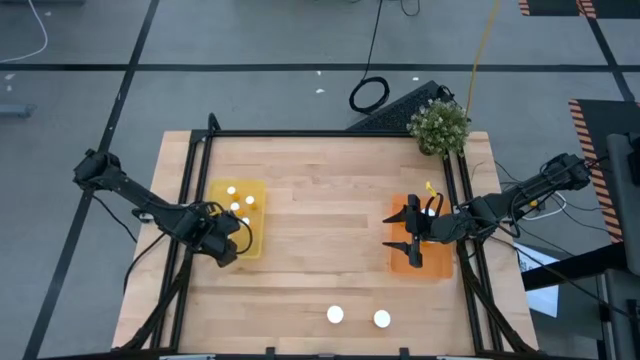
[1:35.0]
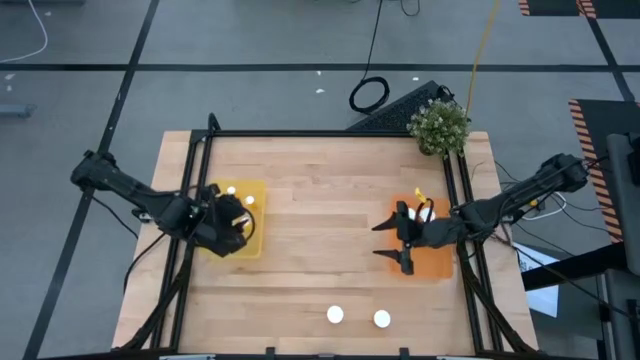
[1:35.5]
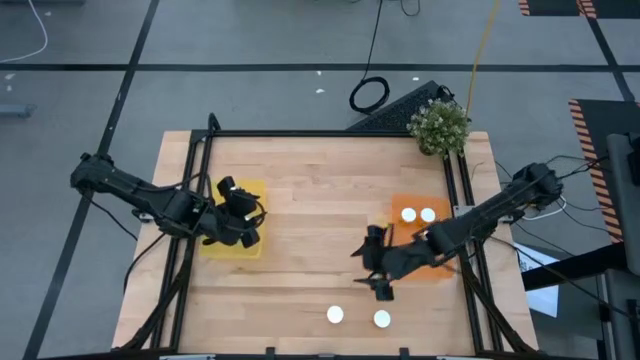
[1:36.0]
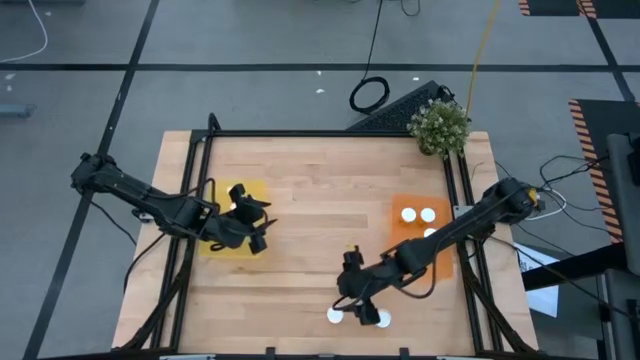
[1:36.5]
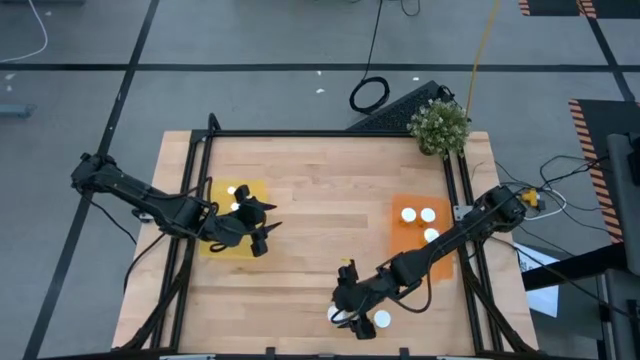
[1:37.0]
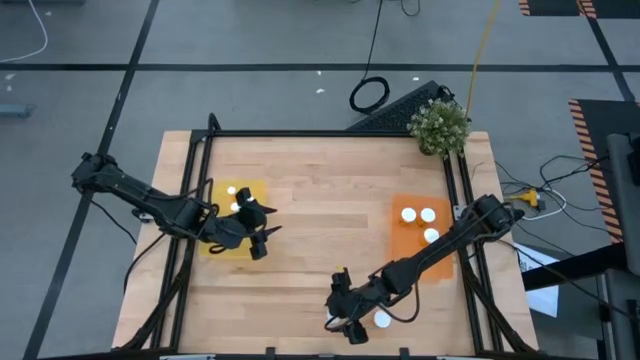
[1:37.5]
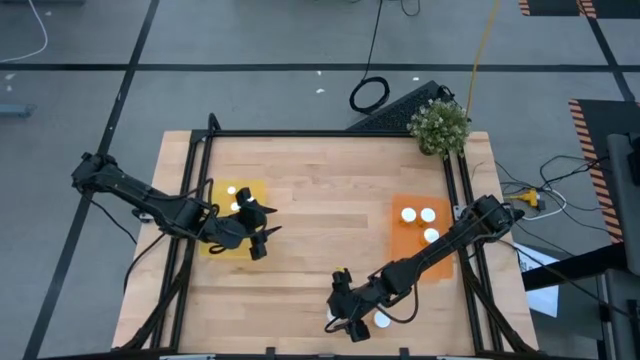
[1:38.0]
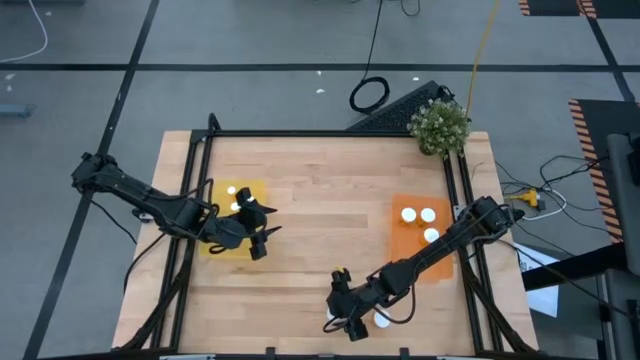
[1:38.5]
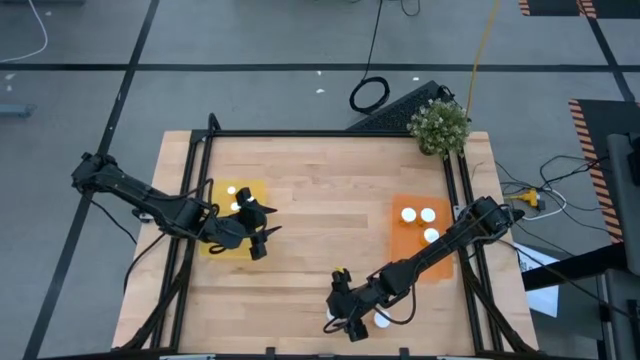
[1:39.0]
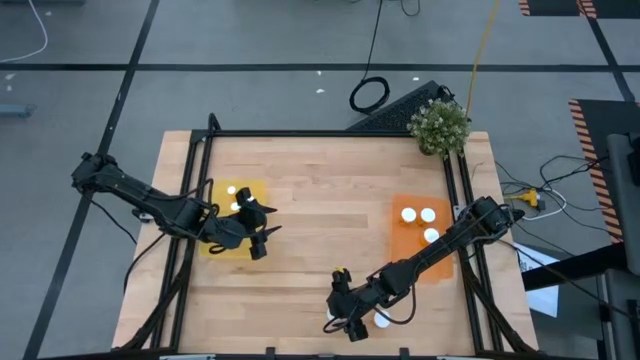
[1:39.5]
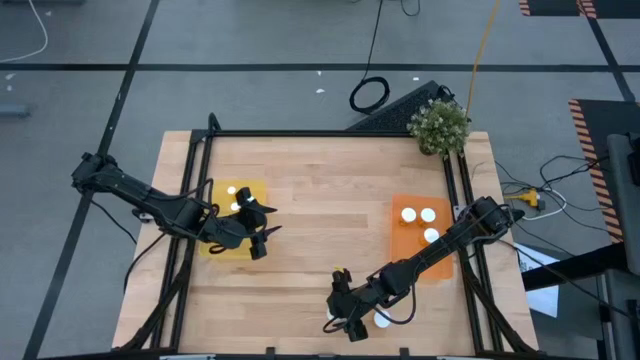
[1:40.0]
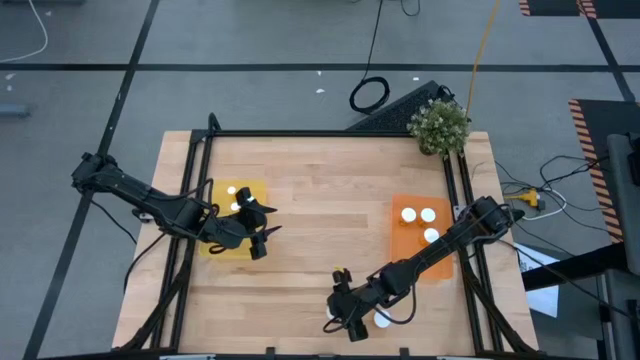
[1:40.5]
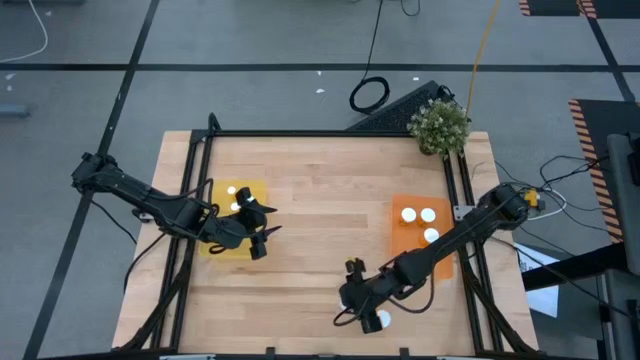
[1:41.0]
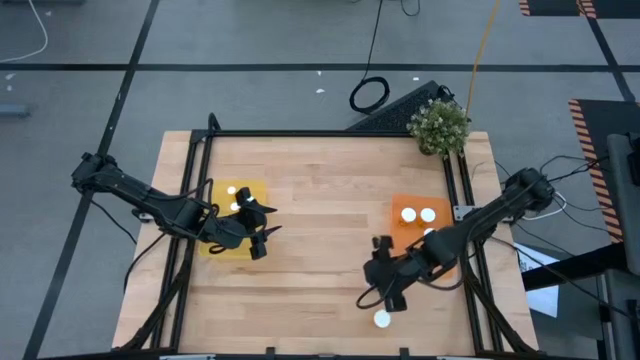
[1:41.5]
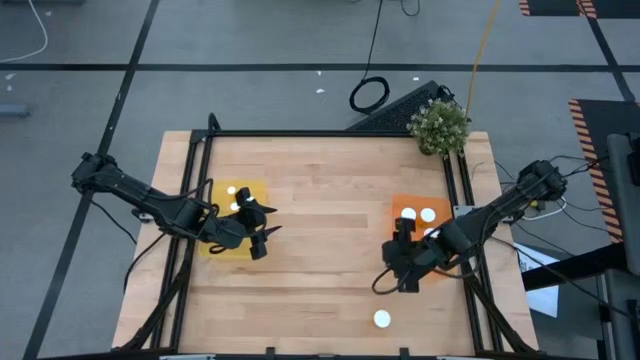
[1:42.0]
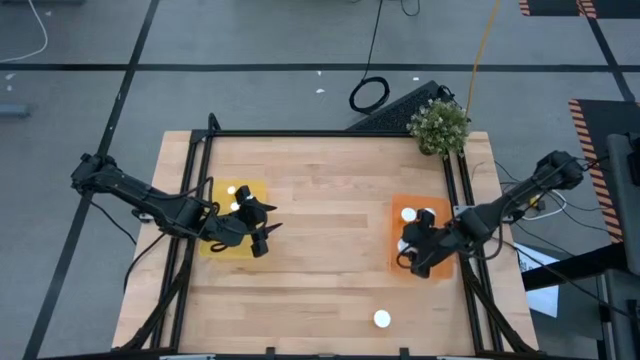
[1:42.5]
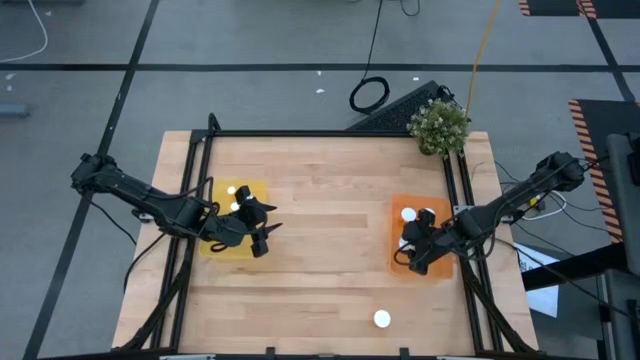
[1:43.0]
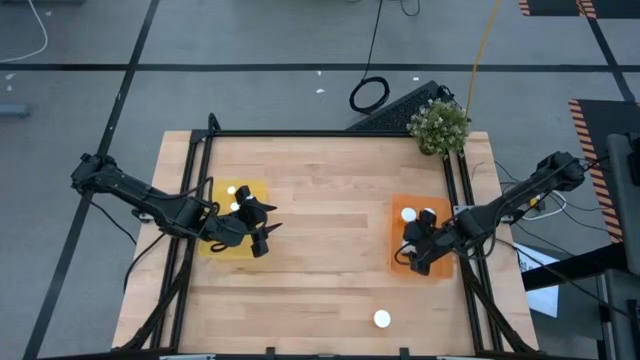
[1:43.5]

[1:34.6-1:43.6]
Task: Pick and place medicine bottles into bin by pill shape (circle, oval)
Put the large orange pill bottle into the orange bin

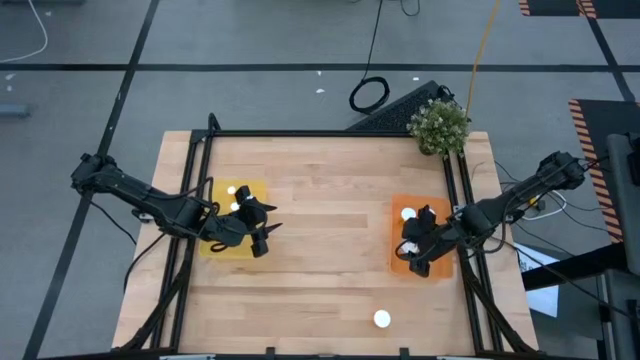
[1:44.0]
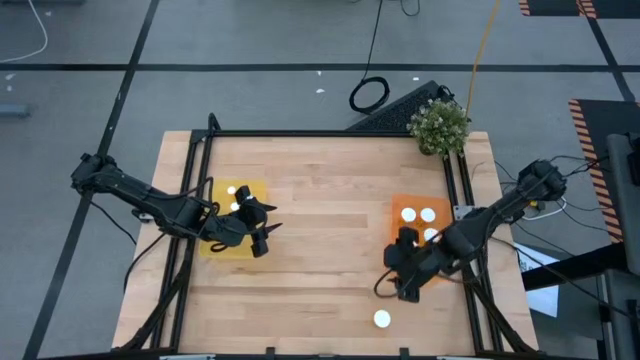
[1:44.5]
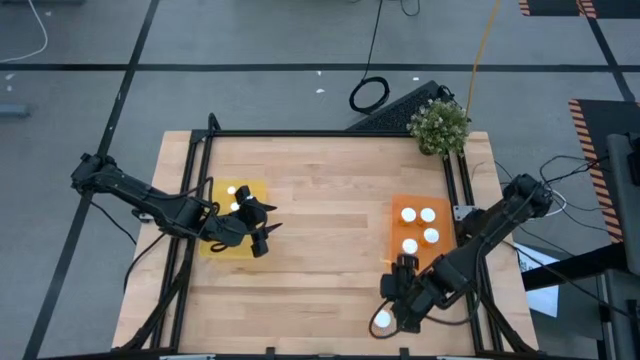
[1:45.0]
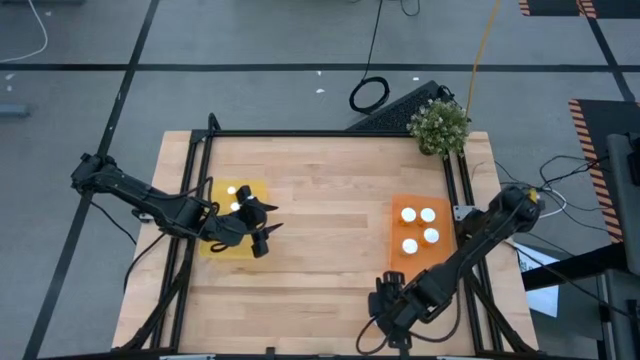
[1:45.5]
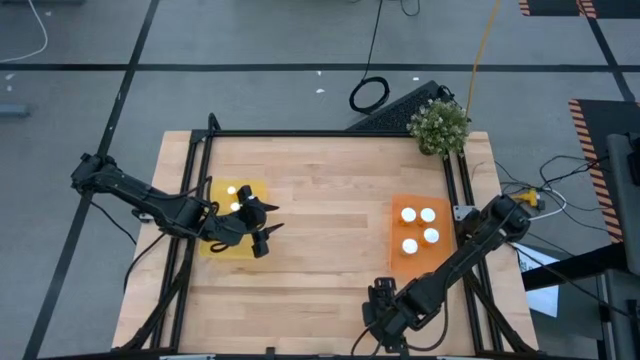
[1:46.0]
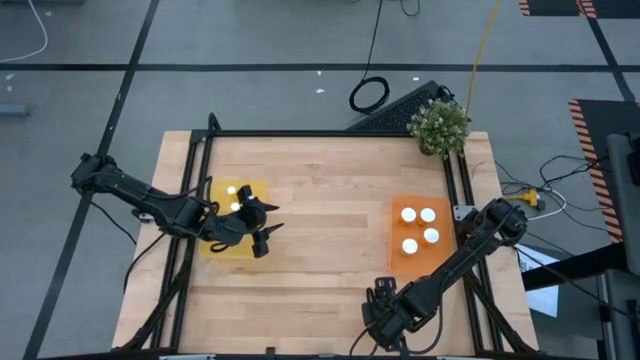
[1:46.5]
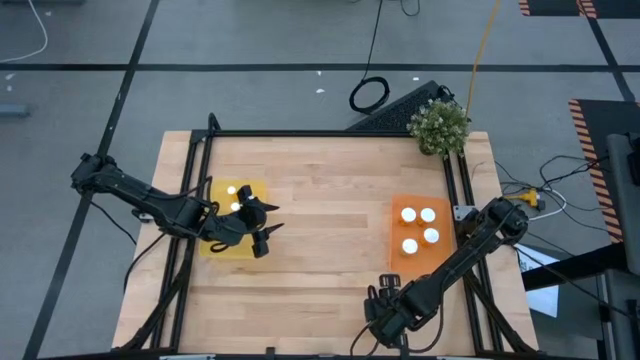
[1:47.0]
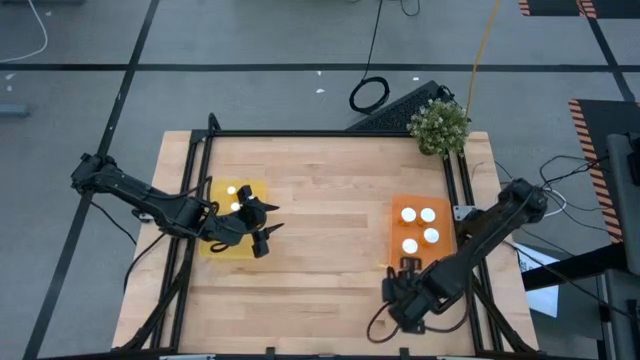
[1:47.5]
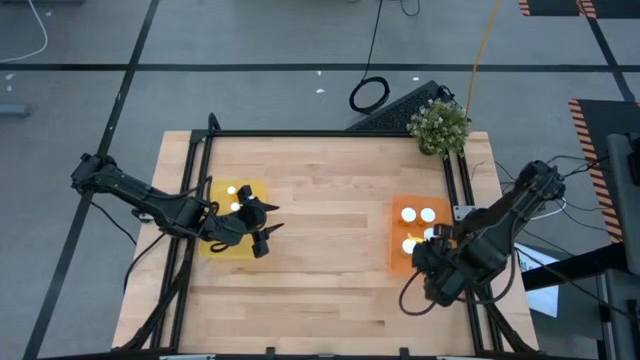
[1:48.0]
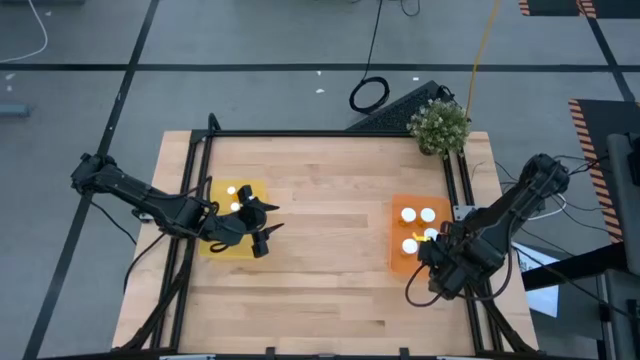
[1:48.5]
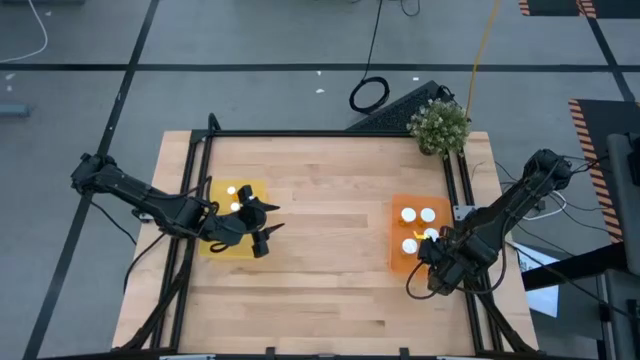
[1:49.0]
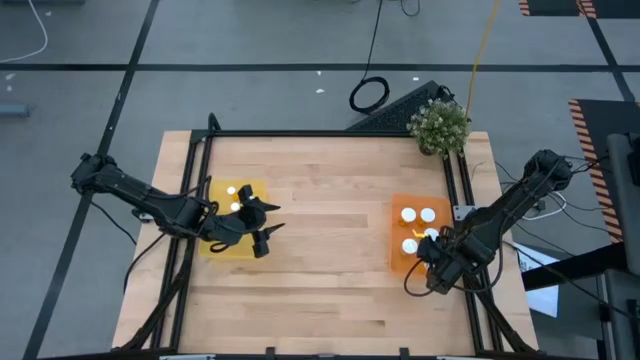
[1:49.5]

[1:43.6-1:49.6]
Put the large orange pill bottle into the orange bin

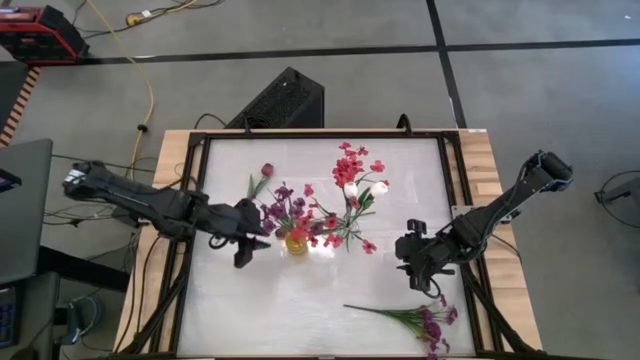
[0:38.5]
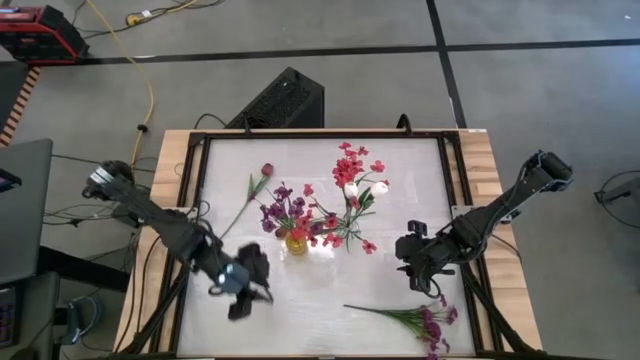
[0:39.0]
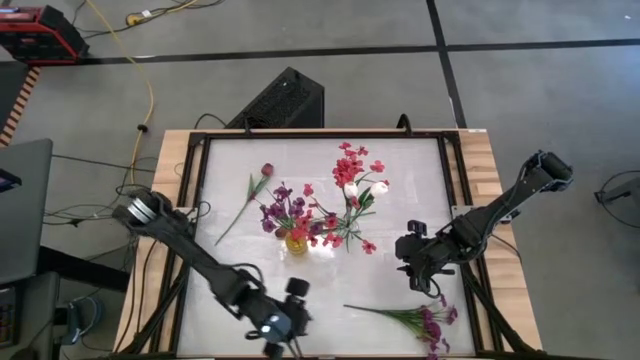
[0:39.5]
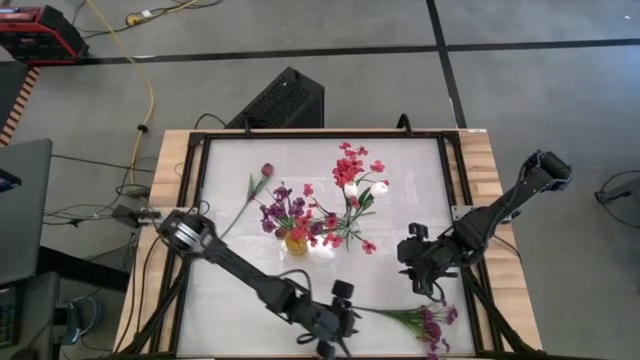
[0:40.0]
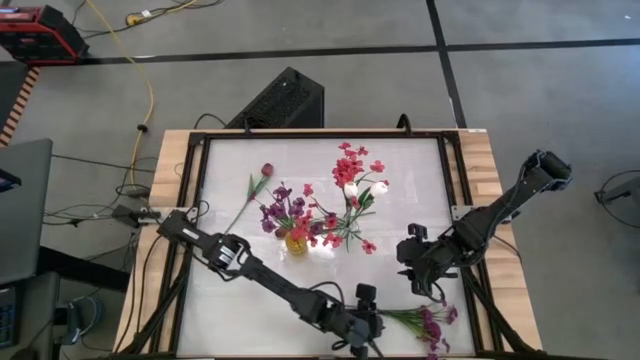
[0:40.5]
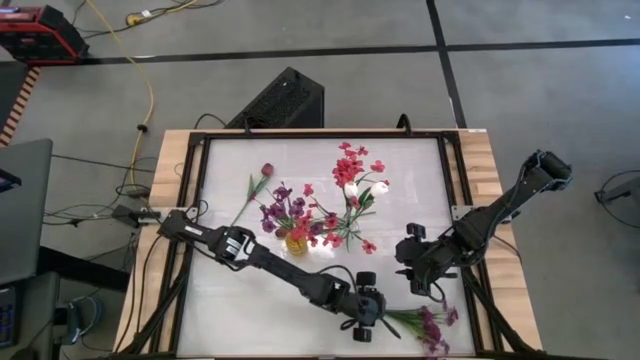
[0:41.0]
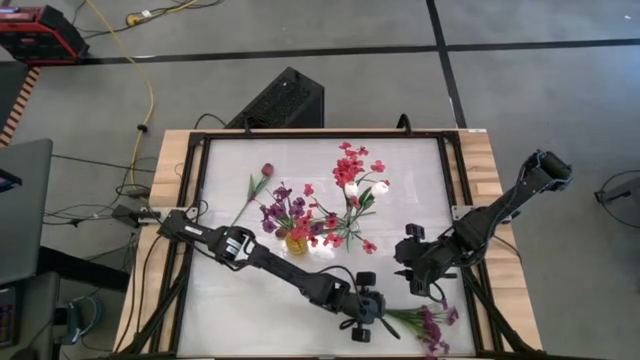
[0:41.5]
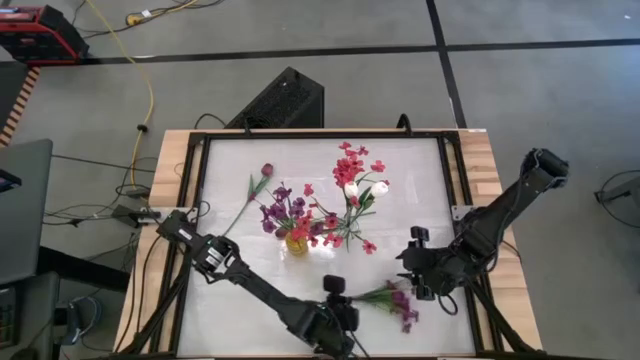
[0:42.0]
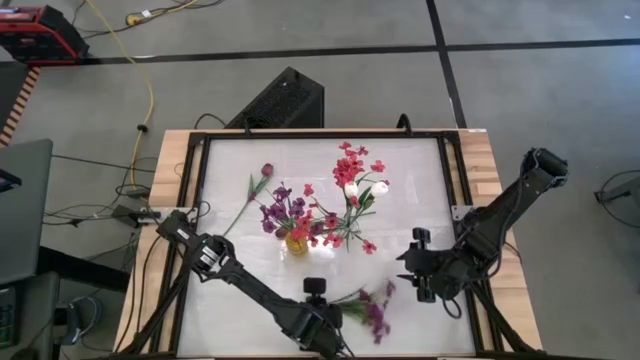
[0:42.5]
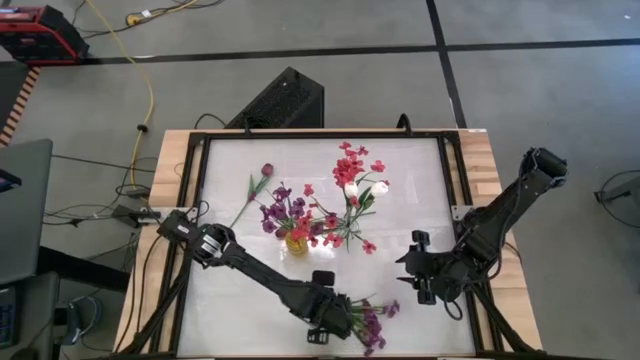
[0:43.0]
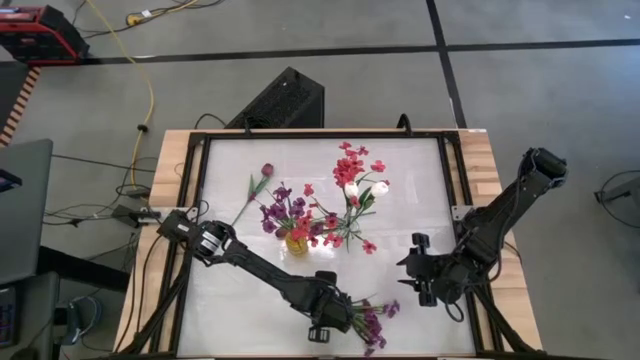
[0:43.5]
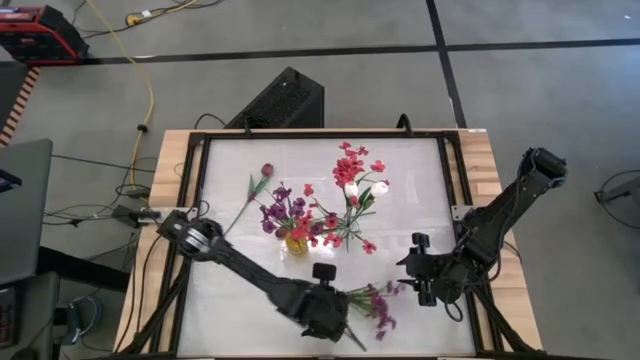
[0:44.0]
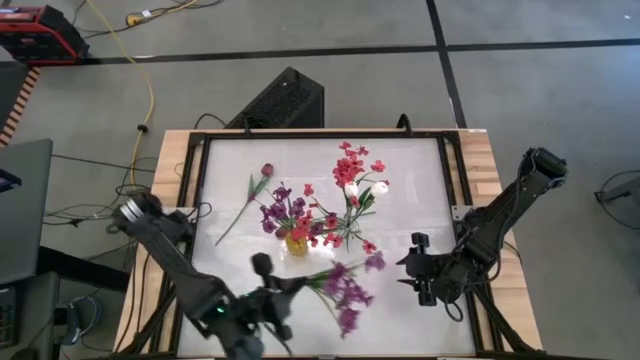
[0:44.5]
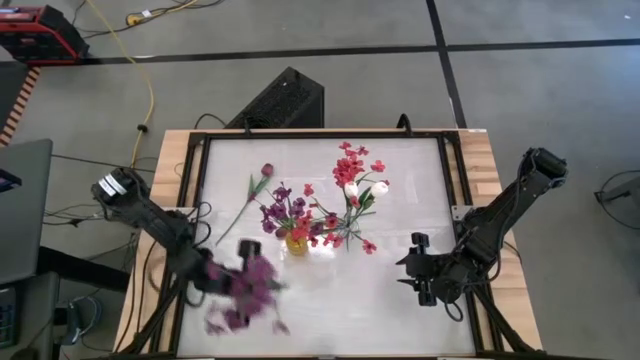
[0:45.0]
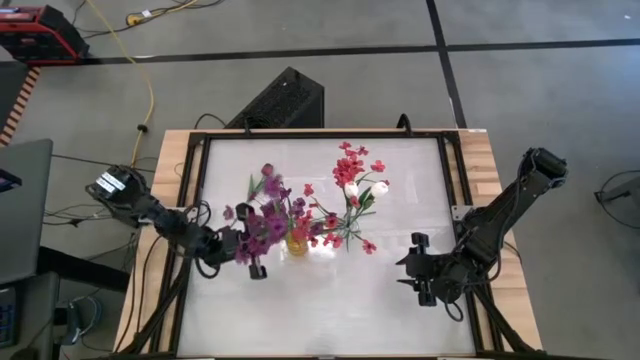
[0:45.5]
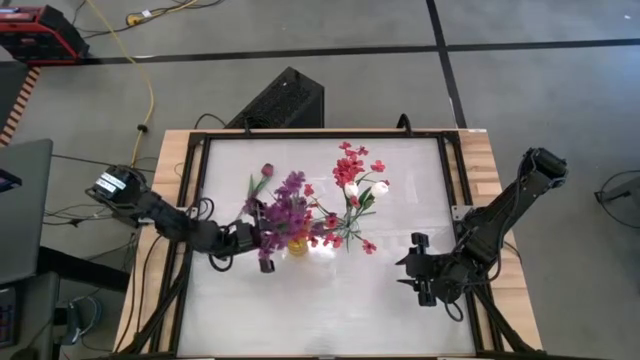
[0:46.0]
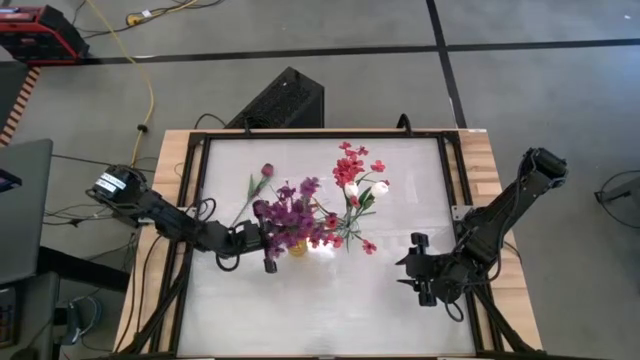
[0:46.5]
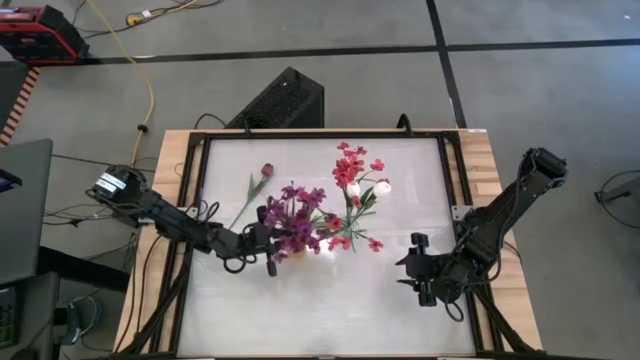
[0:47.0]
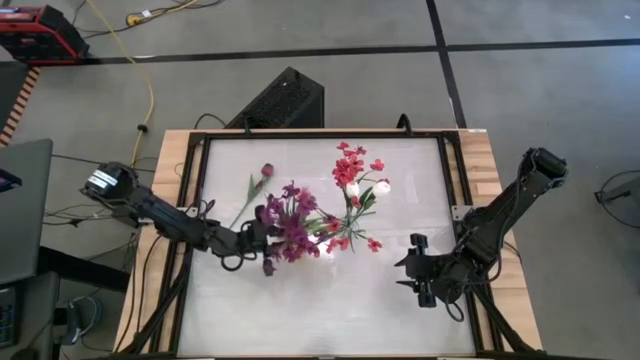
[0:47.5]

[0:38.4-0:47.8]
Task: Sort flowers into vase by color
Put the violet flowers into the yellow vase
